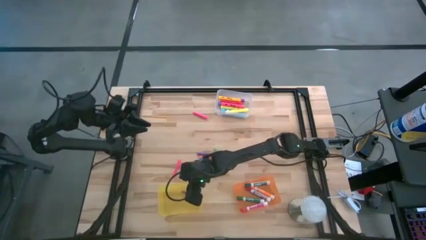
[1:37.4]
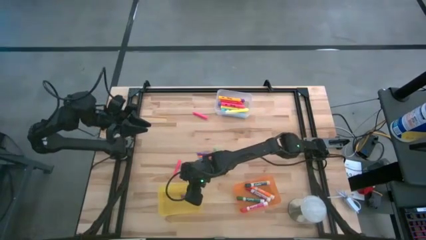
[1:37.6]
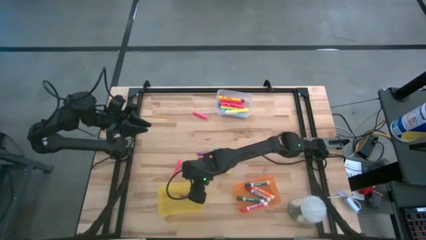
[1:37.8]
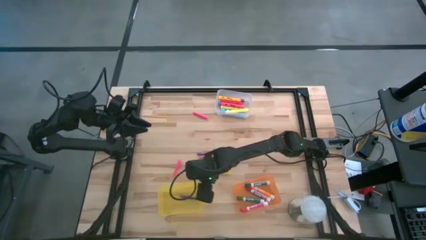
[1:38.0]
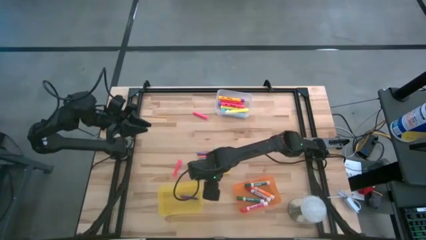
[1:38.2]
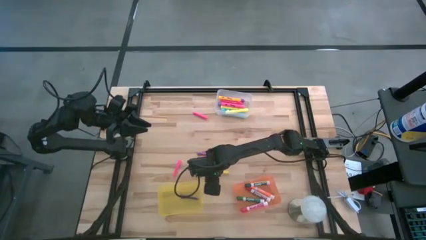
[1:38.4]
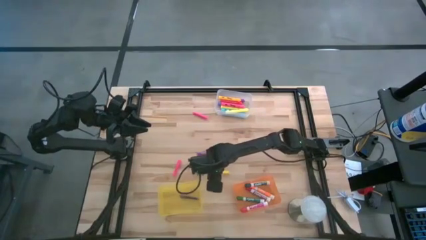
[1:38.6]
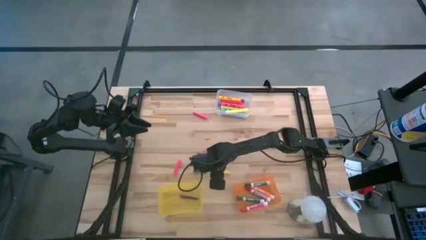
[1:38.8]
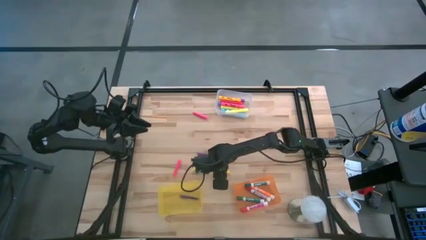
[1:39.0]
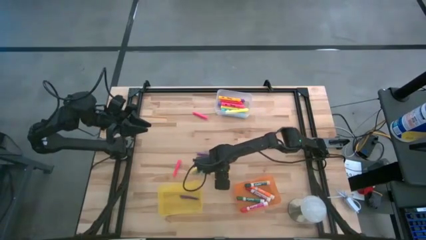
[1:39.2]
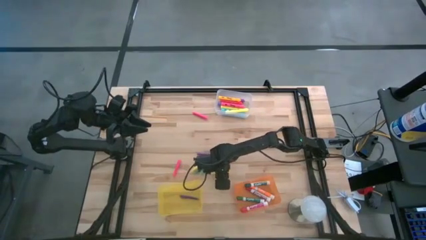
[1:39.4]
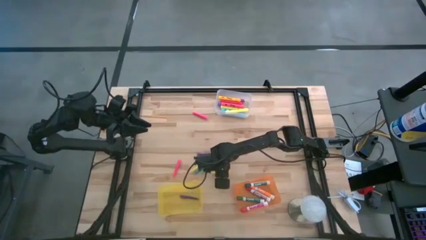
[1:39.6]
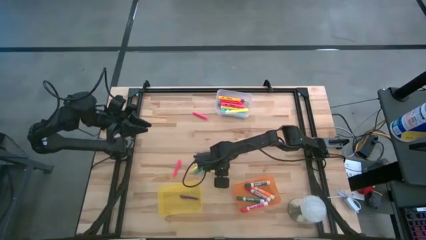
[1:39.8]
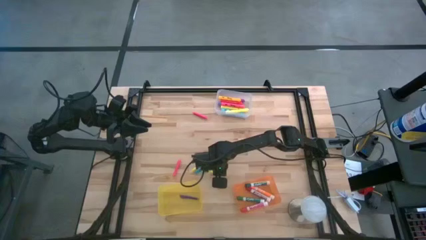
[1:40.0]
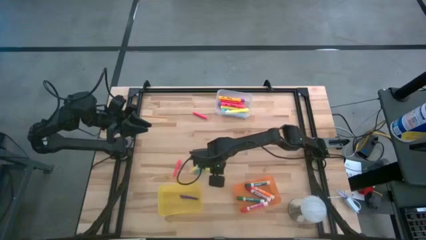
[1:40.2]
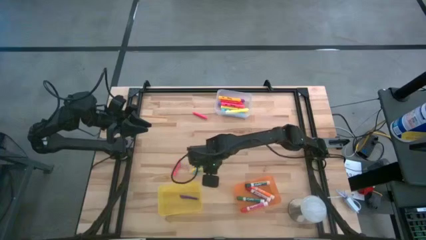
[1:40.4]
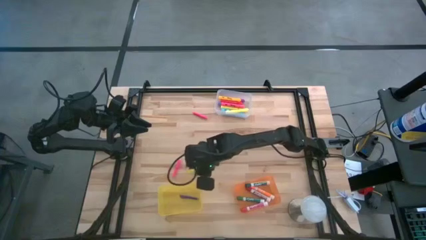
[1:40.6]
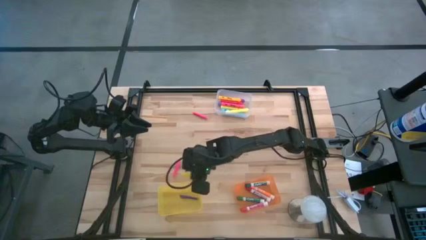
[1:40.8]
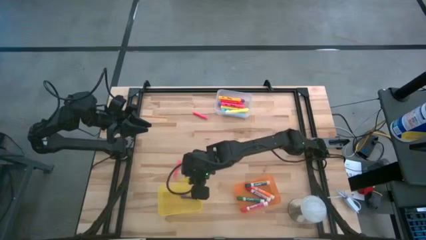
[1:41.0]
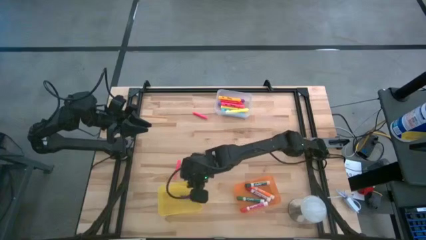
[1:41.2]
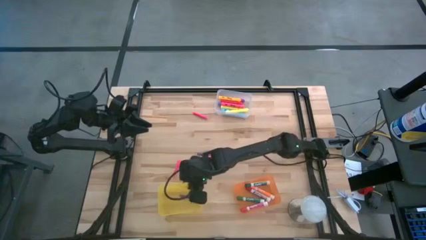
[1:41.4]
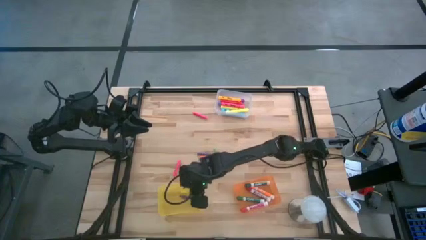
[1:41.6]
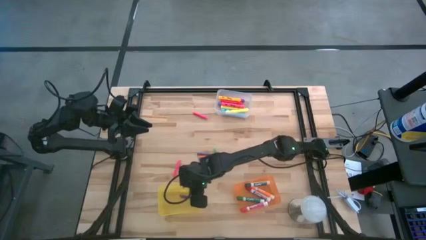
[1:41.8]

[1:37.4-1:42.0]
Task: Pick & Place Markers
Put the right yellow pen into the yellow bin

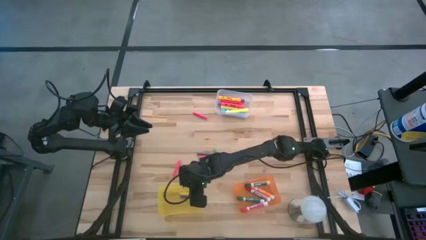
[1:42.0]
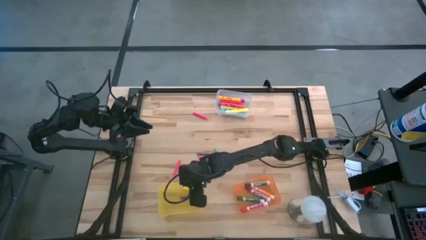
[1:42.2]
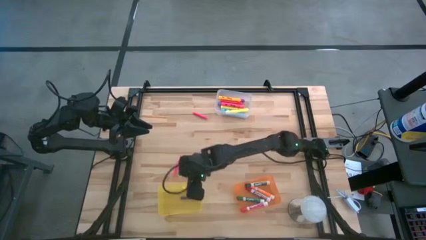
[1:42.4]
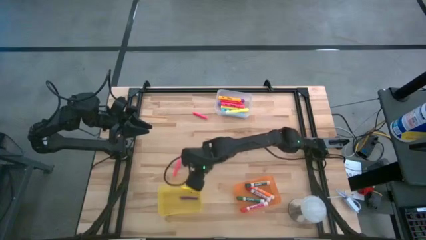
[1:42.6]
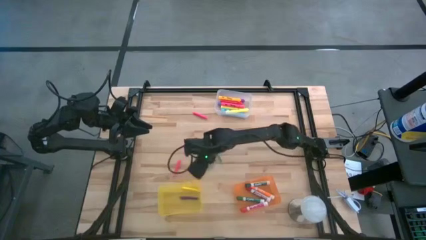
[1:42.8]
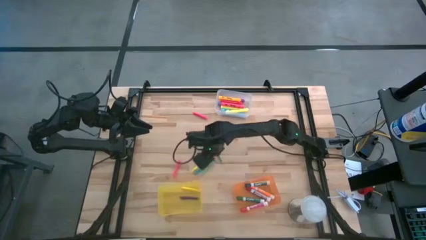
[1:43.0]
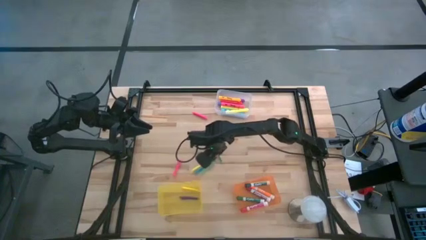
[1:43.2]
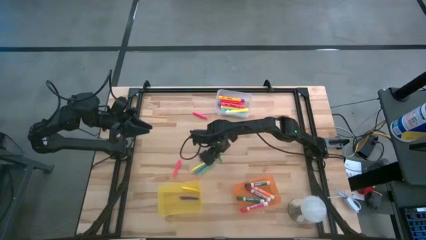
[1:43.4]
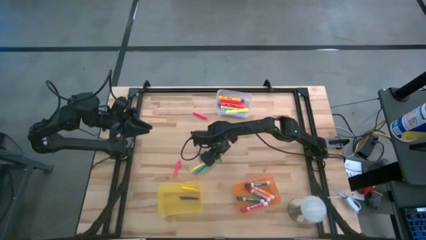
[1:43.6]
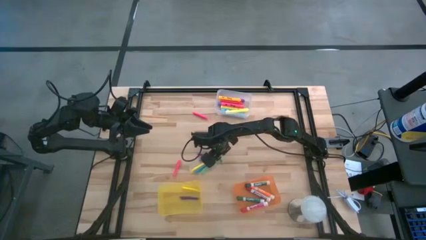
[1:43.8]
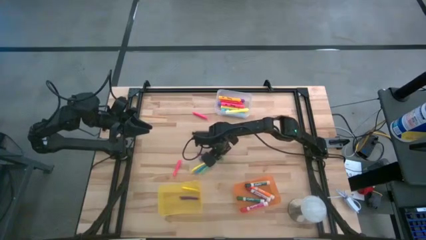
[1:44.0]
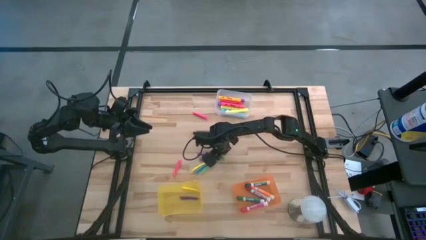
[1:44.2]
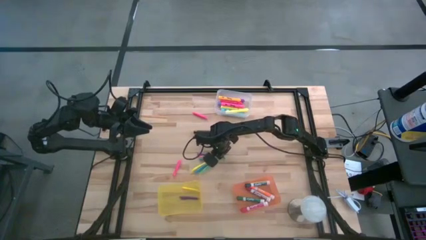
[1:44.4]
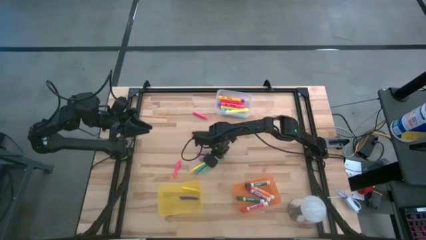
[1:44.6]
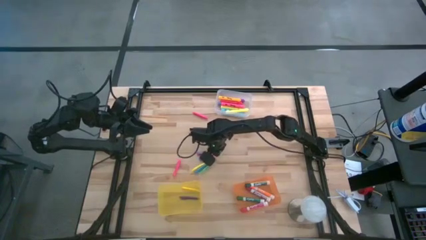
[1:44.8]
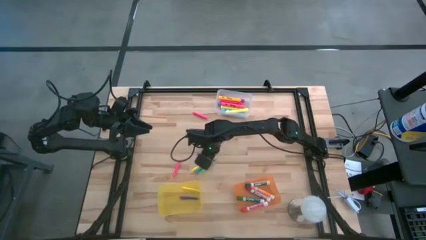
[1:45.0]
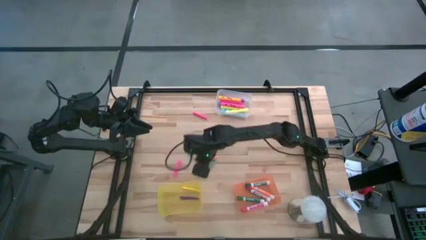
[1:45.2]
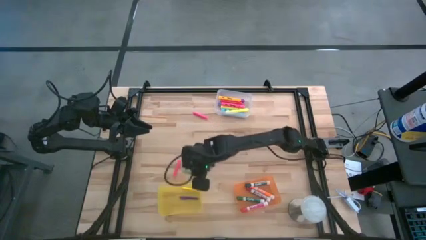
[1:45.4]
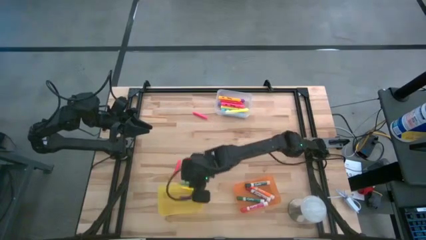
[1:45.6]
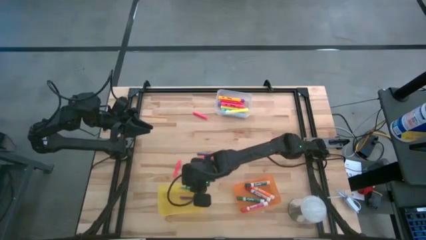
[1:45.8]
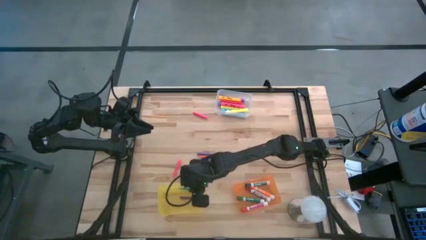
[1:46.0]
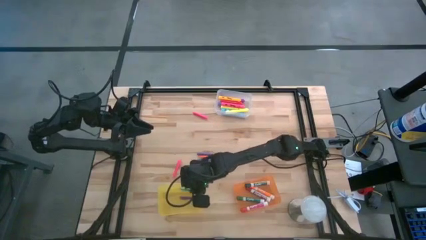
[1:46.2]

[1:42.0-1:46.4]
Put the top green pen into the yellow bin

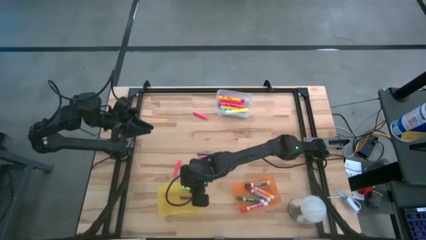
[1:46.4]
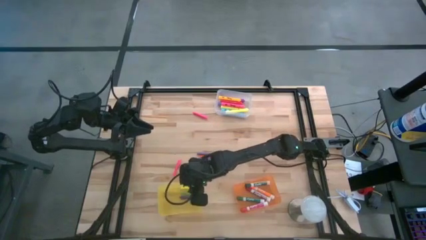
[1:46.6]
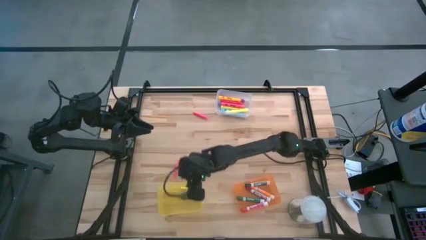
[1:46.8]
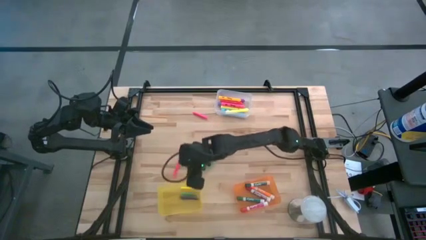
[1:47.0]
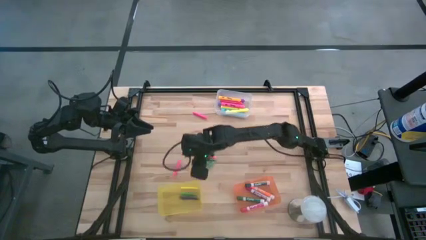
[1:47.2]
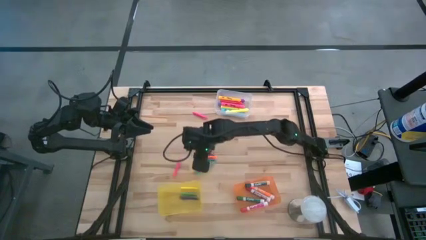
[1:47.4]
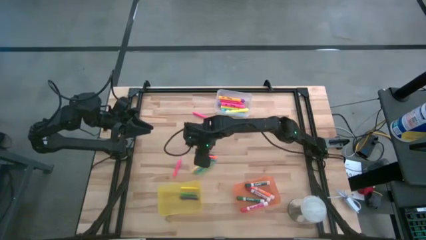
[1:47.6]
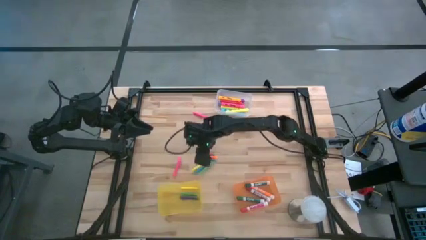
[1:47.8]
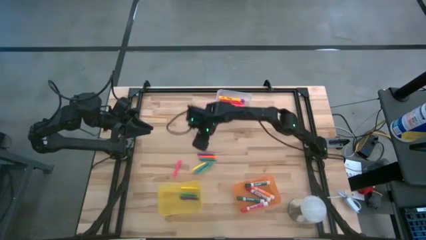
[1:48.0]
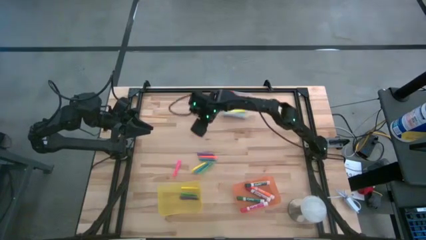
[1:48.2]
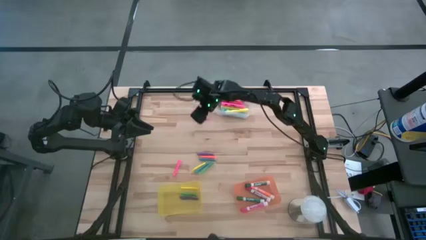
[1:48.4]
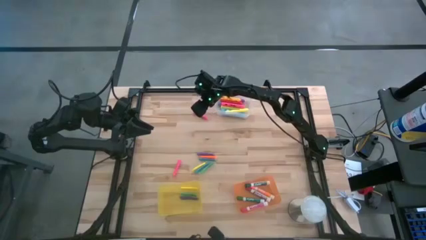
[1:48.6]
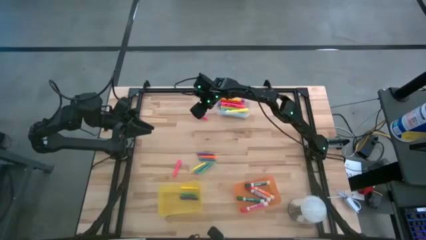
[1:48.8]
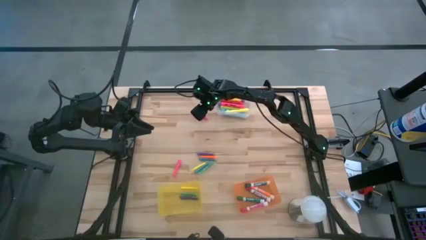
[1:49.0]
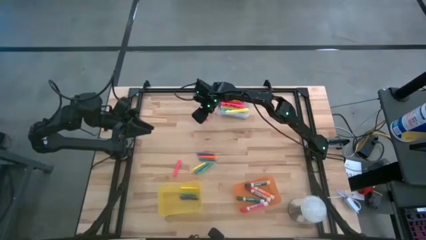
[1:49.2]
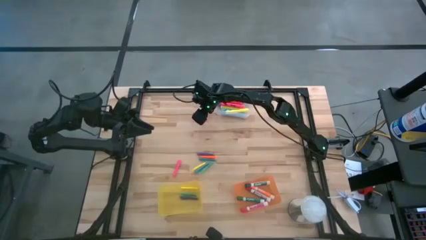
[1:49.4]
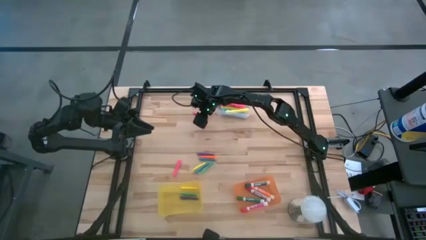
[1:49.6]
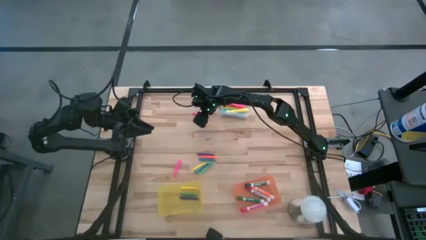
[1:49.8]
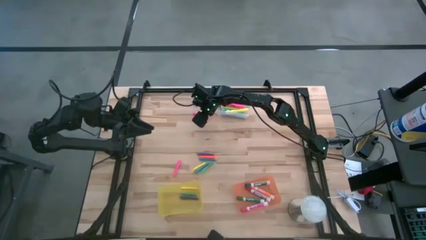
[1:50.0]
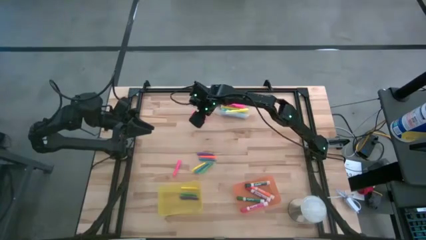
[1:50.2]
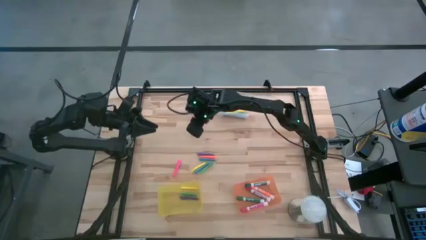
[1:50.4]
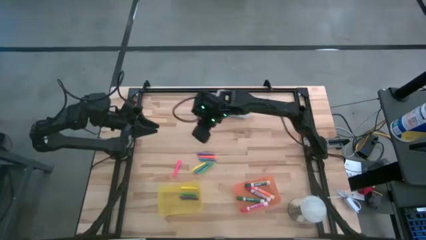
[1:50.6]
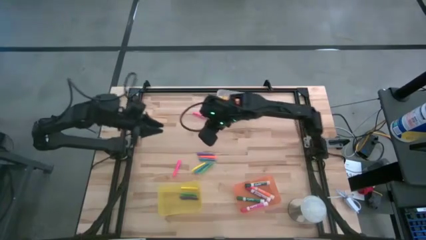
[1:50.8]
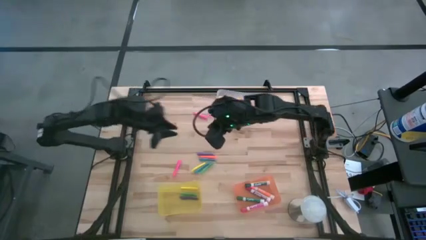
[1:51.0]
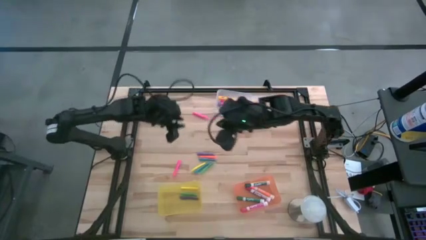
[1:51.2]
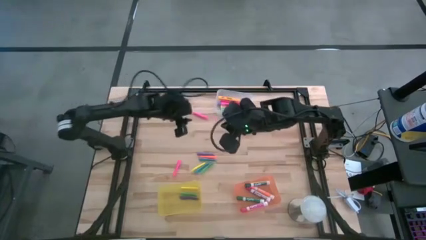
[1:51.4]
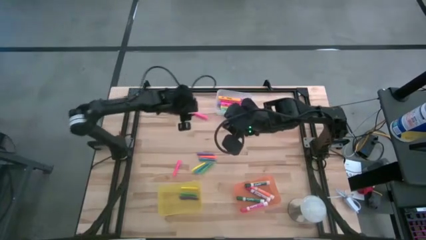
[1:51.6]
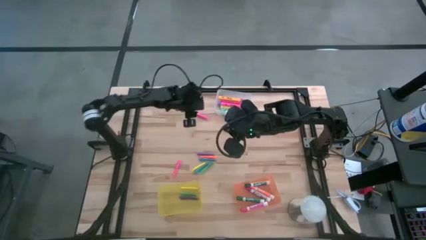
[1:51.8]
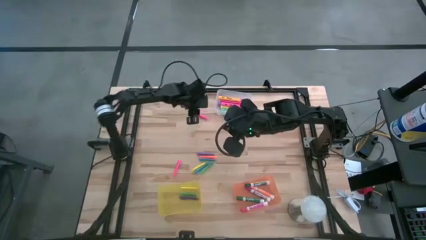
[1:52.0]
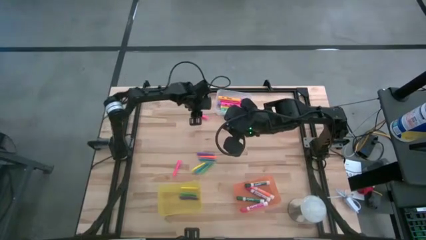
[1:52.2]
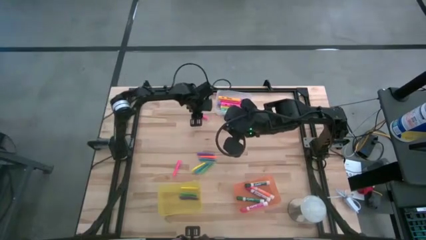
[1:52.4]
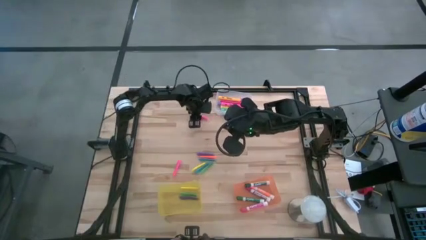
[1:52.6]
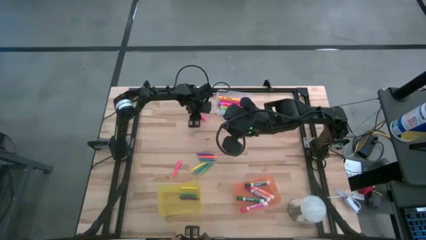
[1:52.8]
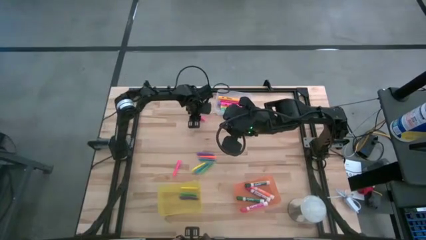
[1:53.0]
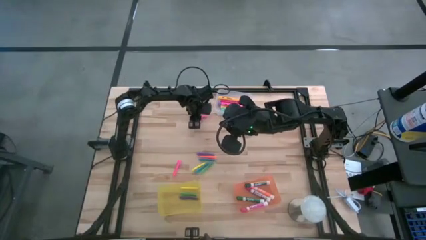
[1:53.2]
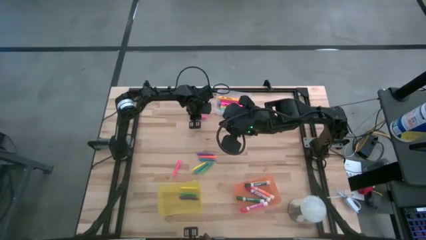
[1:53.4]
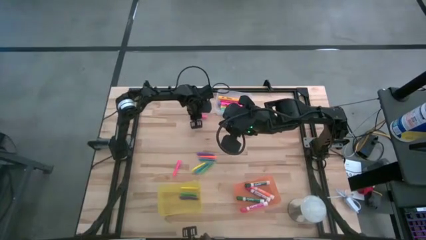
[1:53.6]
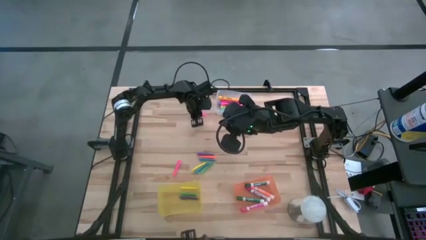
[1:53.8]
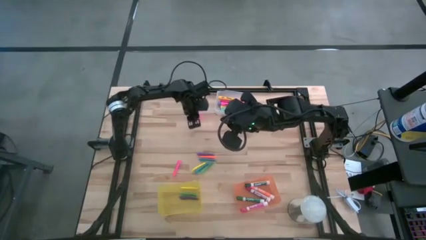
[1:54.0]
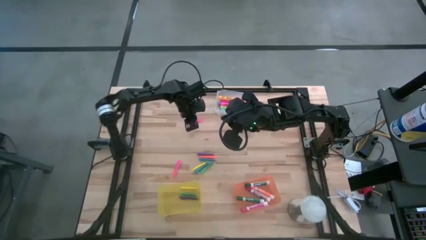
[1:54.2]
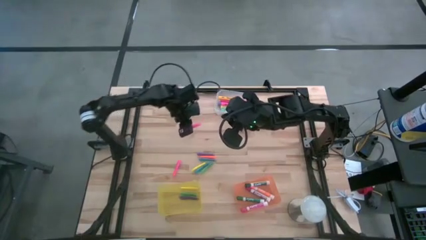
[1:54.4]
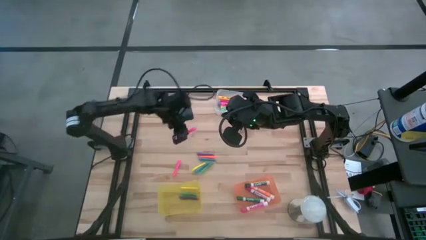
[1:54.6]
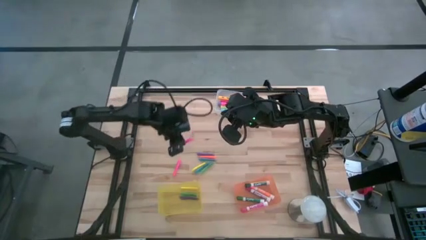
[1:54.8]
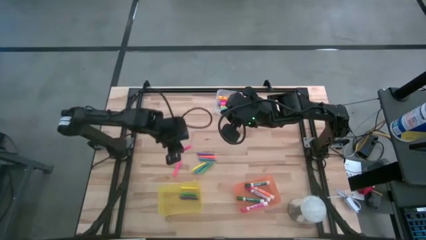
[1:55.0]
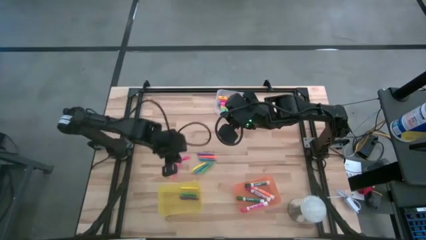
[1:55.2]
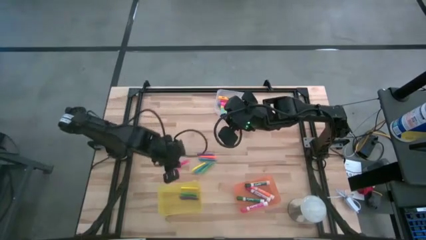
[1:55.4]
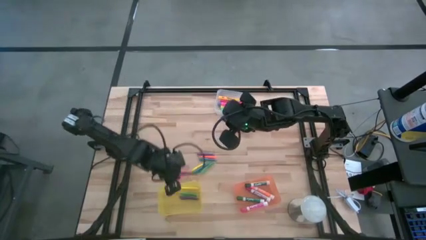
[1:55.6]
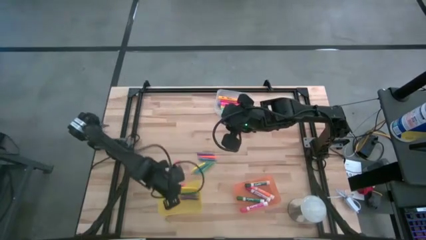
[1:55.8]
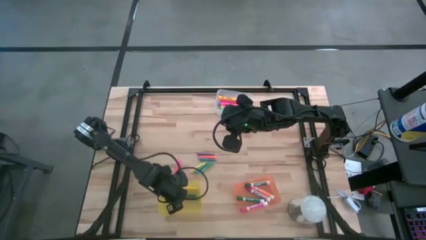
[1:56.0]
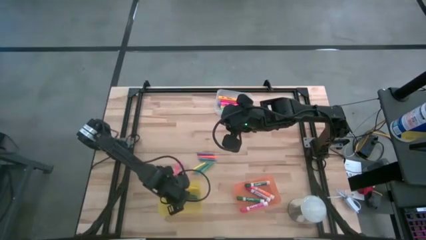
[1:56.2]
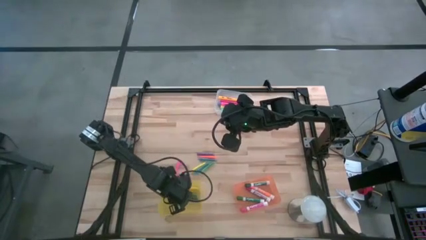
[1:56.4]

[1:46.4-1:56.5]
Put the pink pen into the yellow bin
